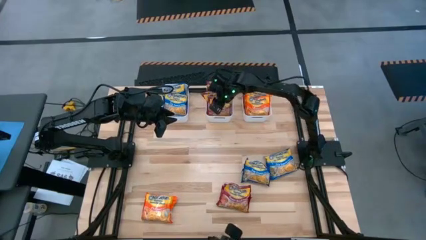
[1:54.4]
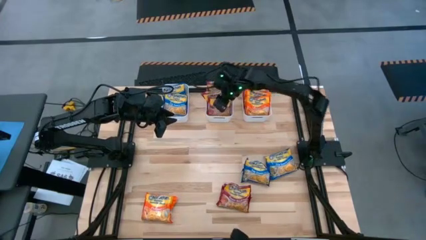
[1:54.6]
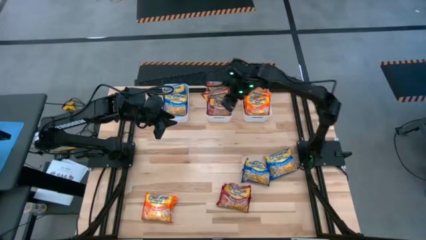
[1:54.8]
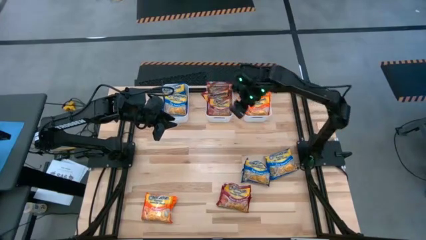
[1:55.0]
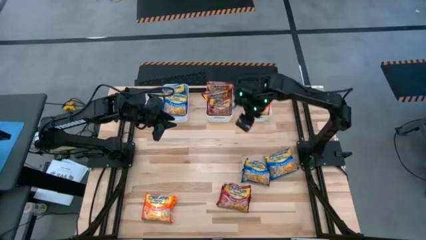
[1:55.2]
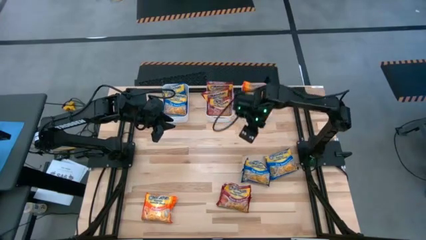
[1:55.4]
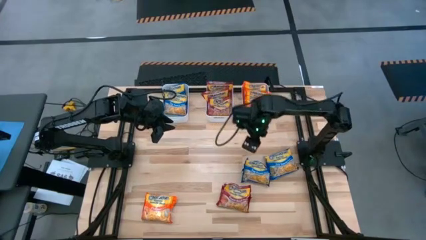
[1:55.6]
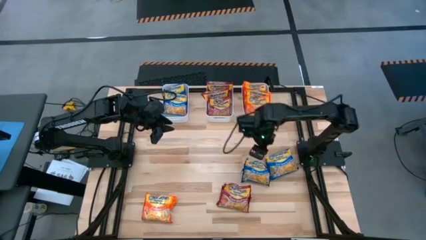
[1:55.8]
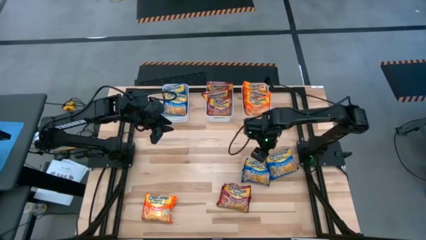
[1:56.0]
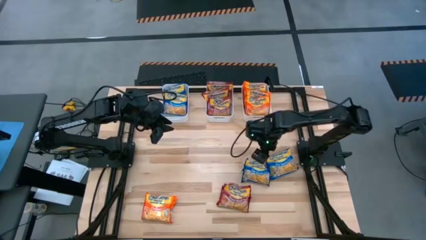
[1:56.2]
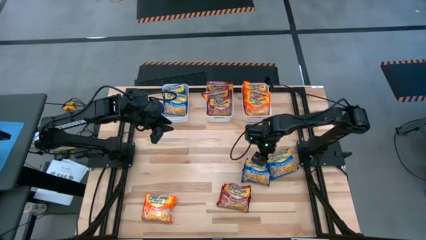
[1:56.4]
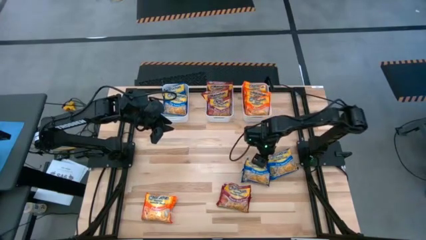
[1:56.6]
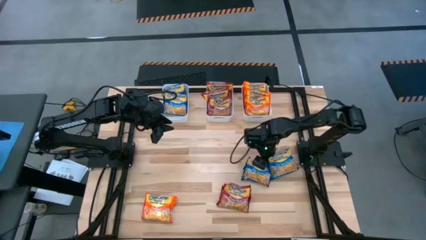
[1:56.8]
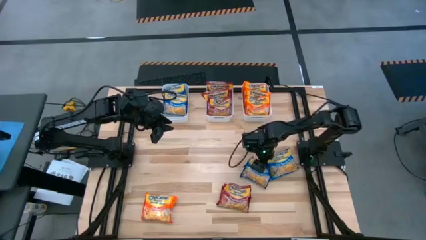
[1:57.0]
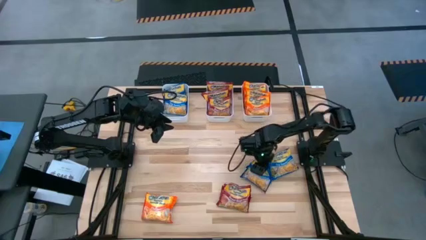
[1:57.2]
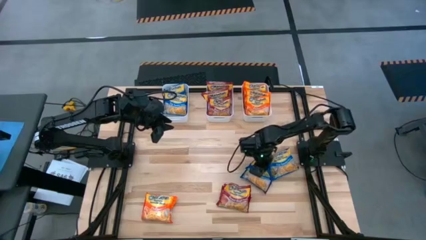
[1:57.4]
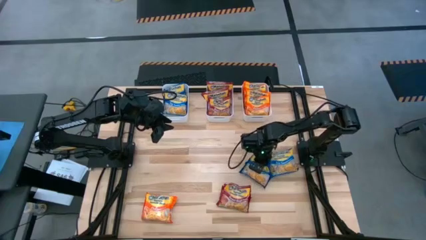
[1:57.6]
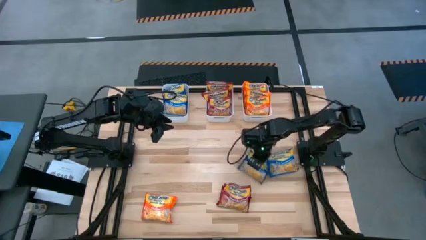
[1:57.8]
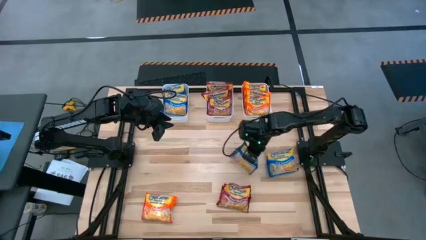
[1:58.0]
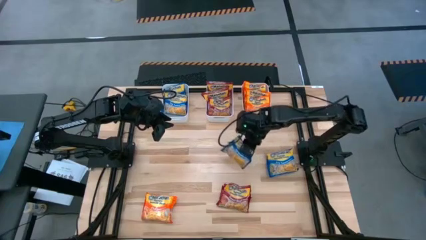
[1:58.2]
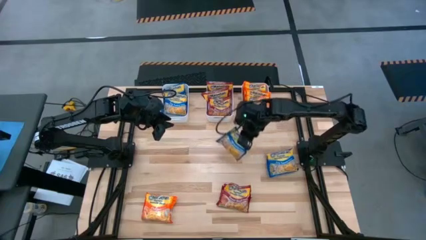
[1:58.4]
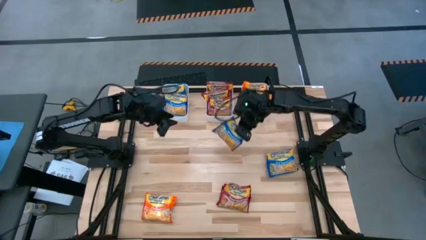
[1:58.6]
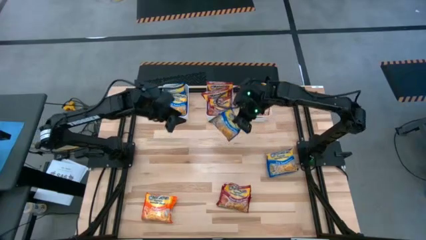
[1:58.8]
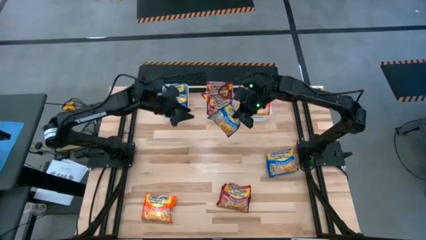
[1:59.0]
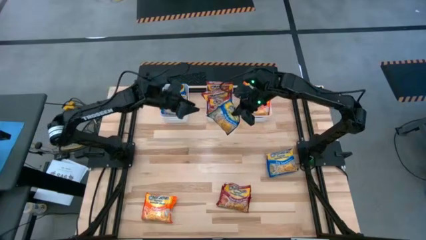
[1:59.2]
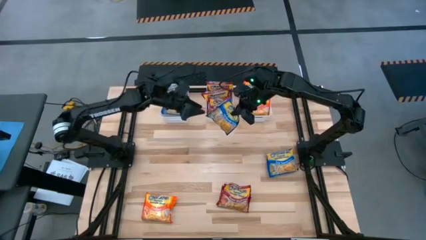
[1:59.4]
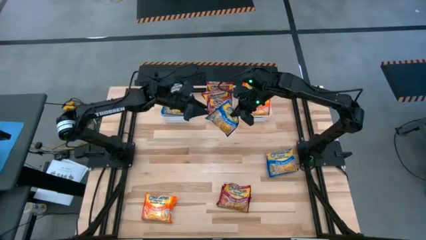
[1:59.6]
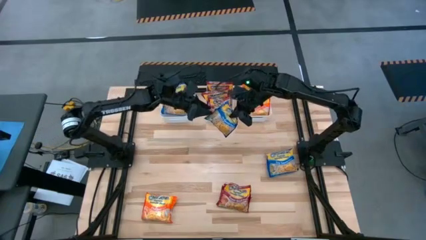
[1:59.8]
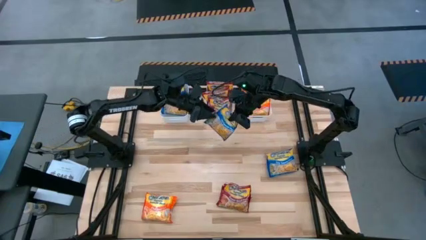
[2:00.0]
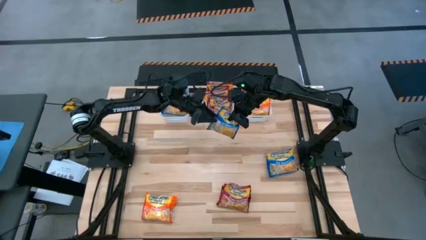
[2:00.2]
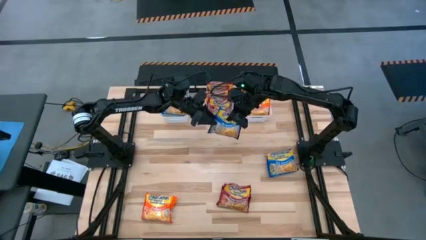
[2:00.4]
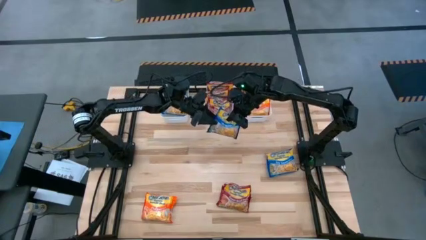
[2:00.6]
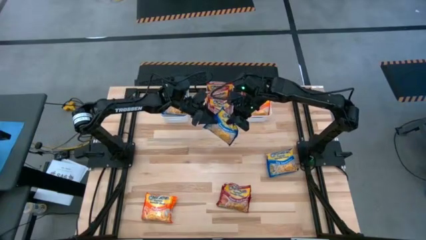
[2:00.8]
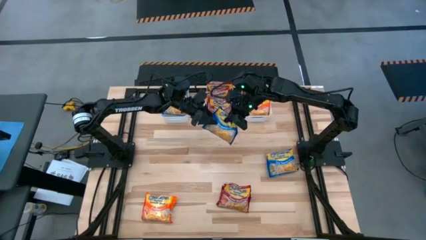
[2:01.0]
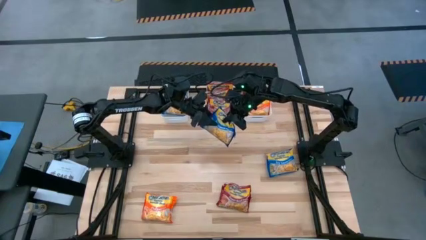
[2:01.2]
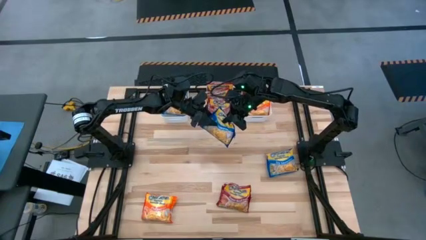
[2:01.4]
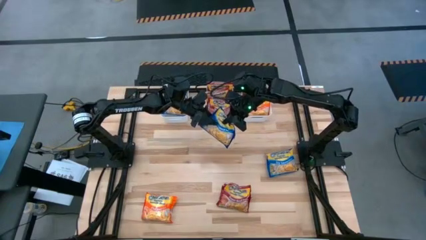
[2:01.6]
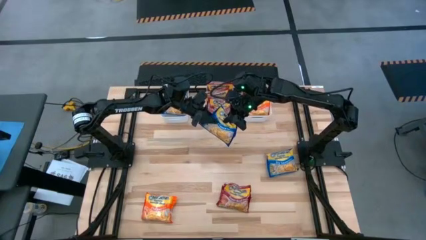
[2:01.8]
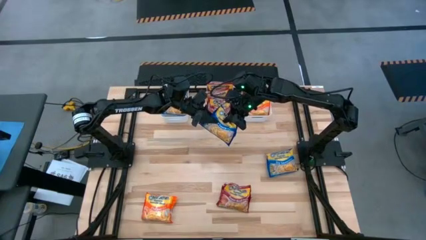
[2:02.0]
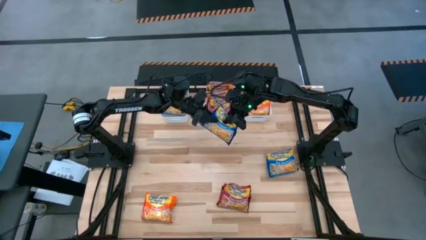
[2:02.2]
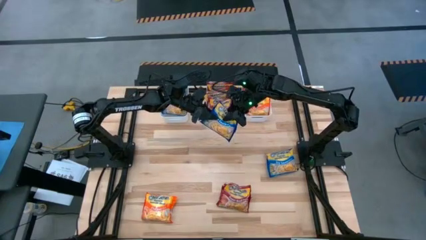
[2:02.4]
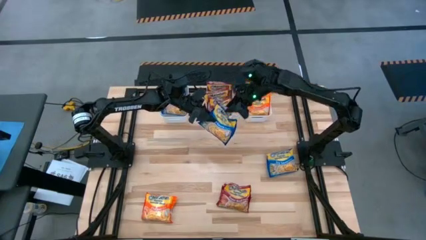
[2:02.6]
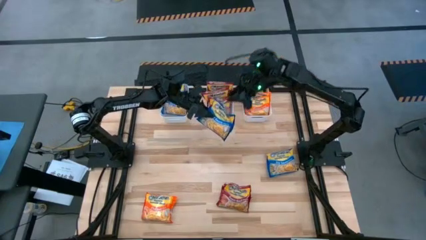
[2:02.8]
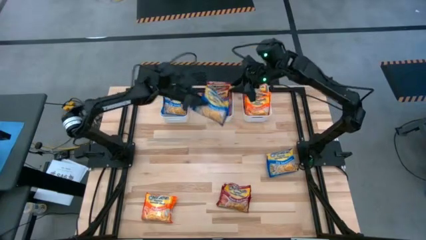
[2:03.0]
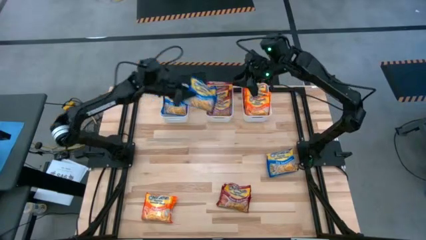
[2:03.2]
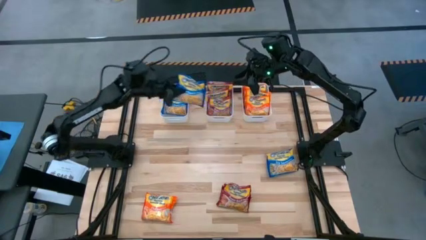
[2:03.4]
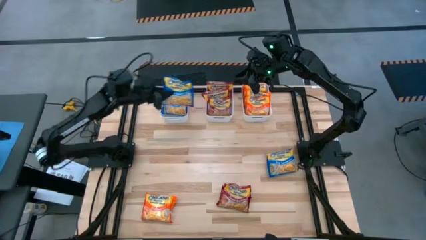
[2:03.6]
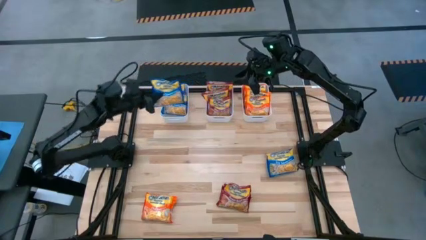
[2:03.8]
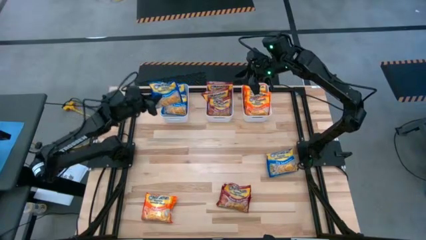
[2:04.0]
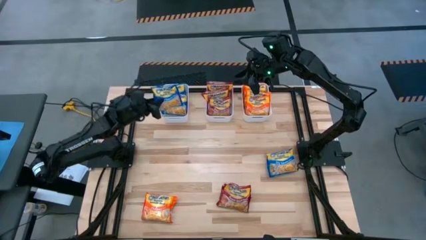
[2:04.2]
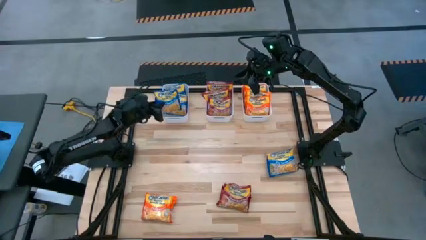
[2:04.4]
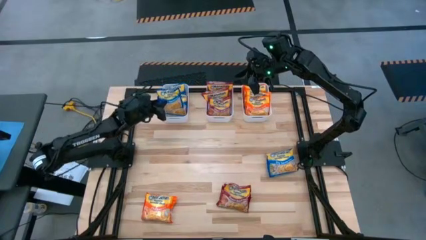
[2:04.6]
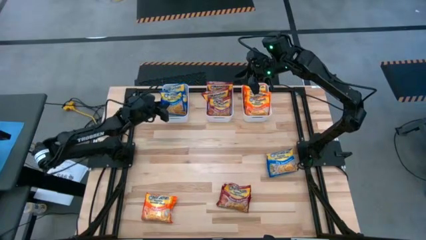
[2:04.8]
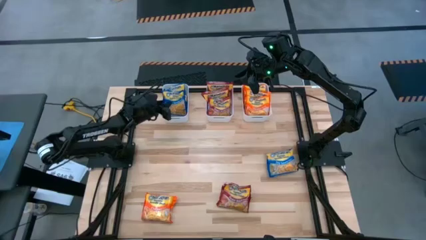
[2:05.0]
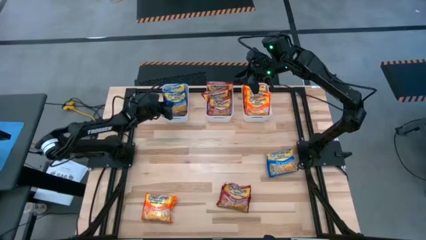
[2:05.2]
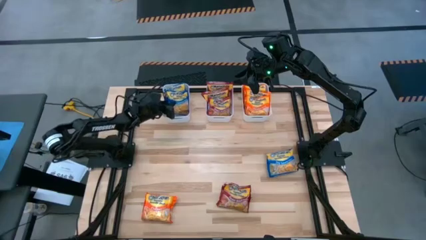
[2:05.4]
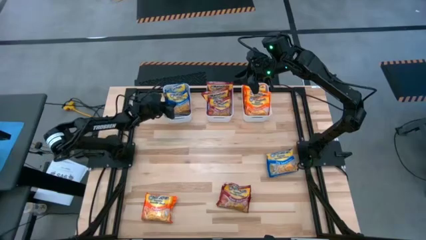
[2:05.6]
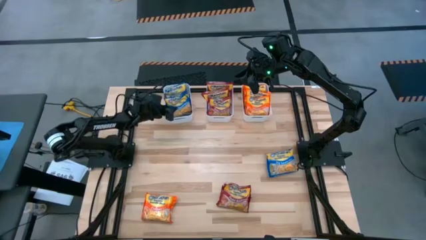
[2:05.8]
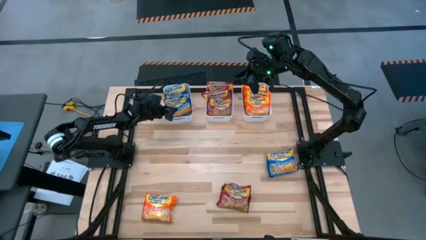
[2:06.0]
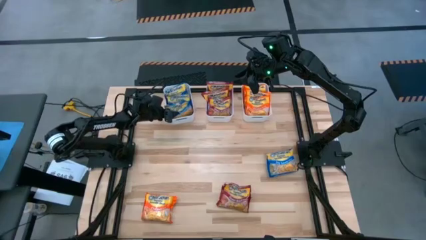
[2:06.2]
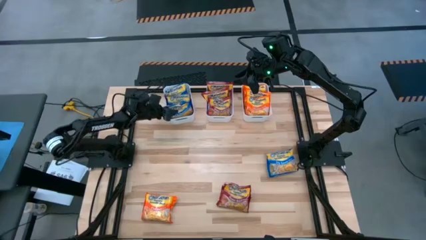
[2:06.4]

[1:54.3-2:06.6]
Task: Sort Maruchan noodles
Put the blue noodle pack into the left white bin
